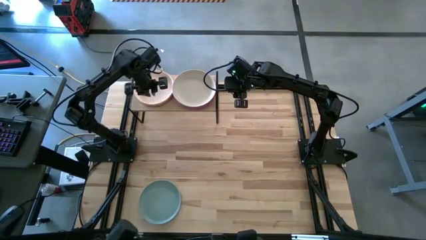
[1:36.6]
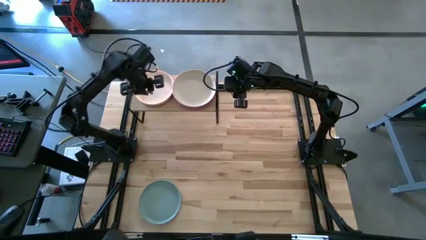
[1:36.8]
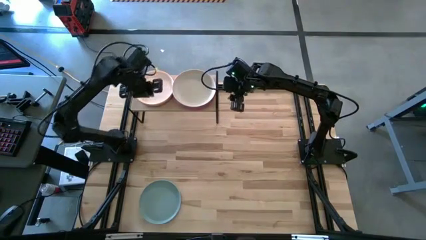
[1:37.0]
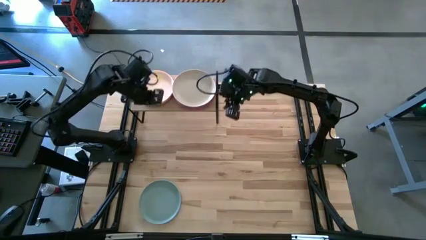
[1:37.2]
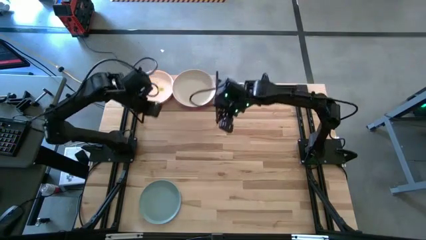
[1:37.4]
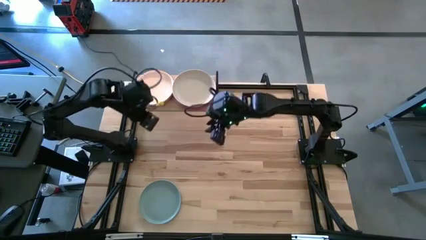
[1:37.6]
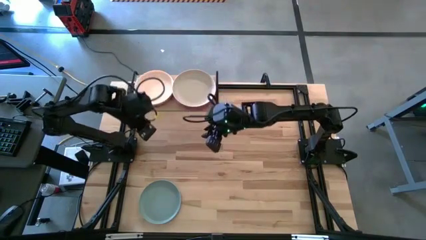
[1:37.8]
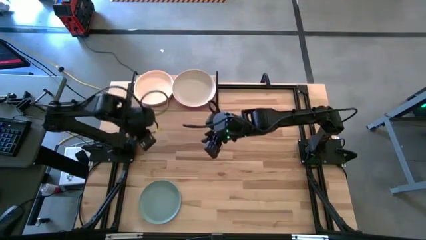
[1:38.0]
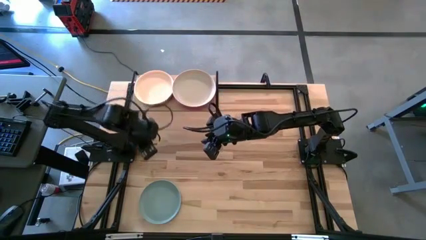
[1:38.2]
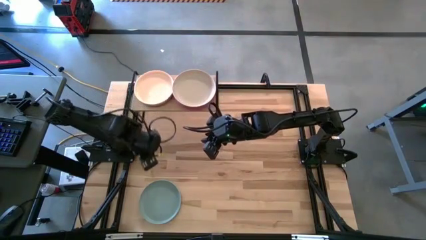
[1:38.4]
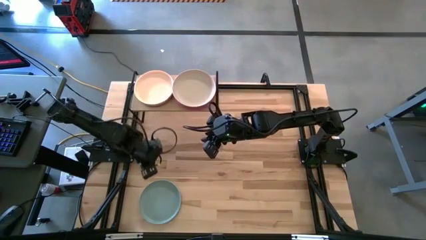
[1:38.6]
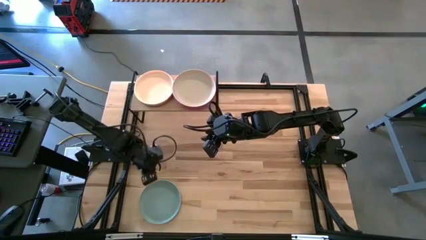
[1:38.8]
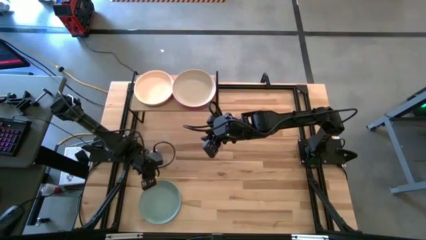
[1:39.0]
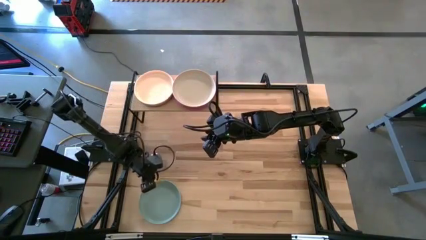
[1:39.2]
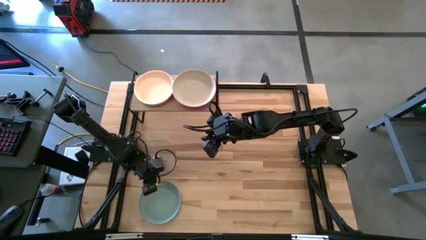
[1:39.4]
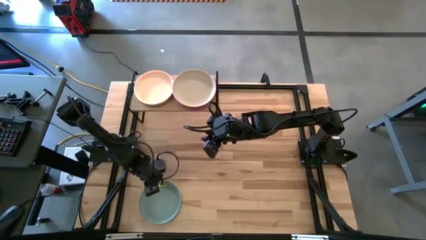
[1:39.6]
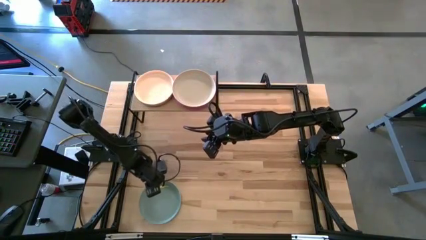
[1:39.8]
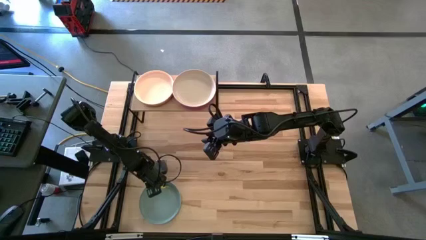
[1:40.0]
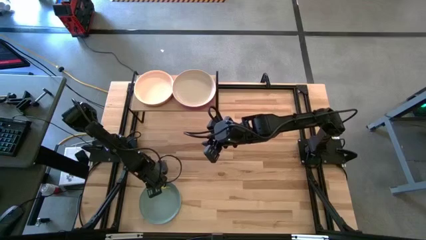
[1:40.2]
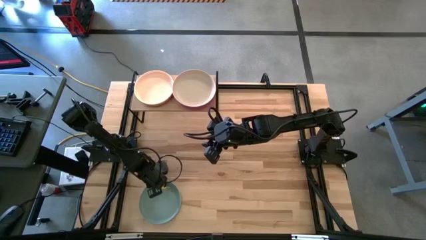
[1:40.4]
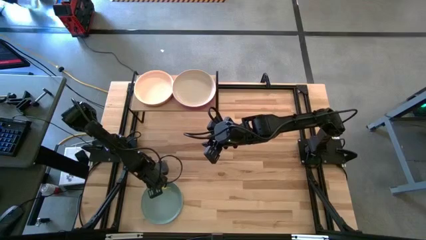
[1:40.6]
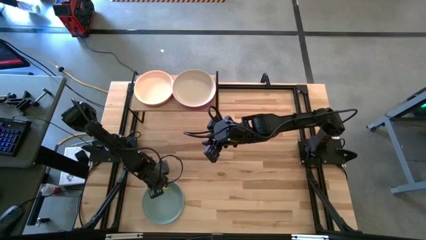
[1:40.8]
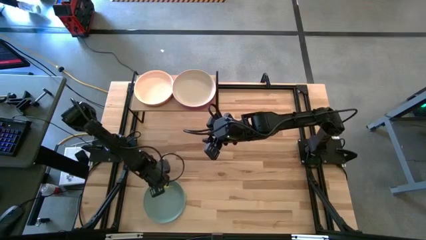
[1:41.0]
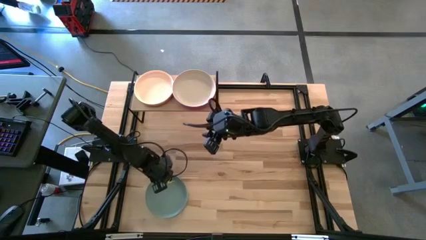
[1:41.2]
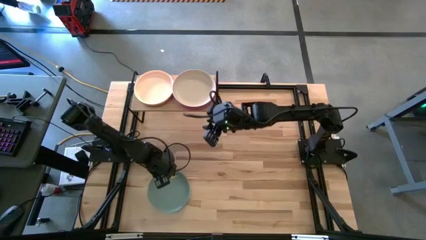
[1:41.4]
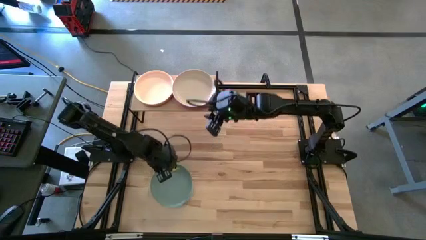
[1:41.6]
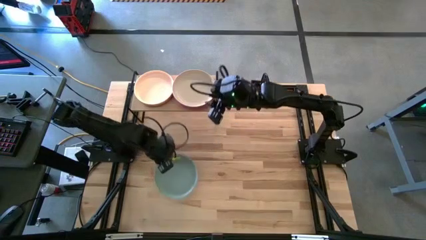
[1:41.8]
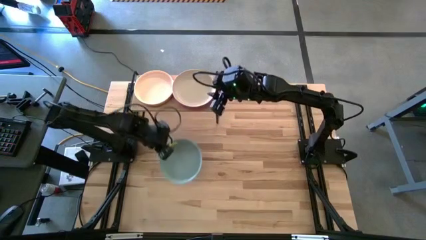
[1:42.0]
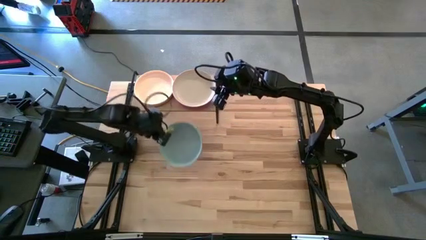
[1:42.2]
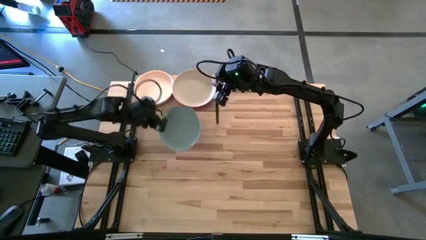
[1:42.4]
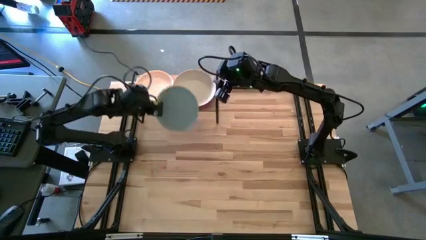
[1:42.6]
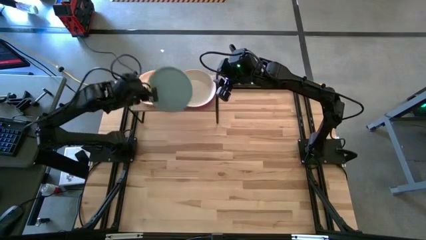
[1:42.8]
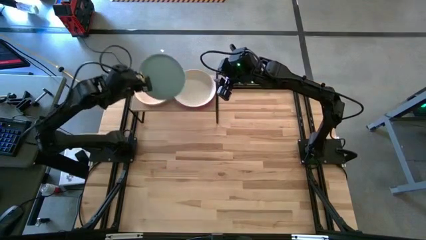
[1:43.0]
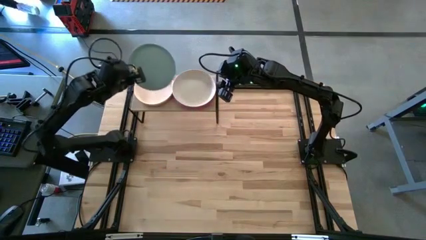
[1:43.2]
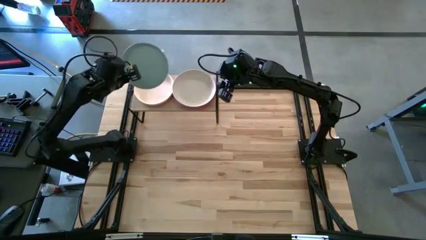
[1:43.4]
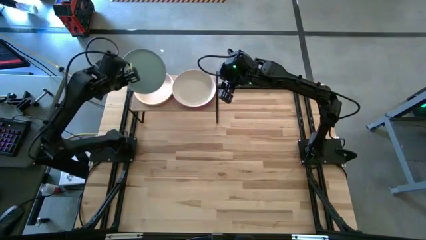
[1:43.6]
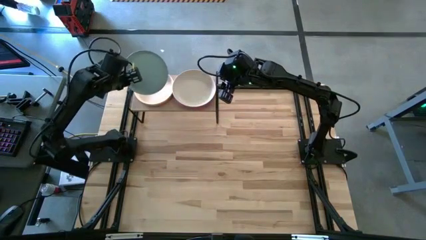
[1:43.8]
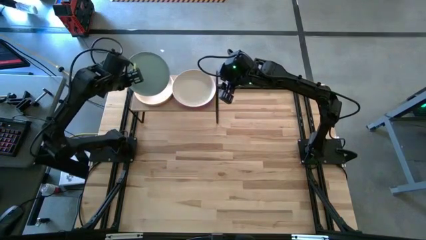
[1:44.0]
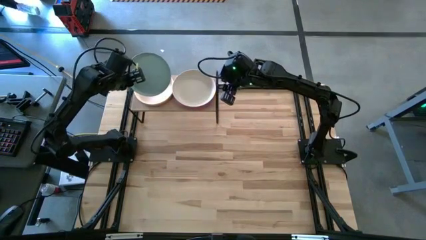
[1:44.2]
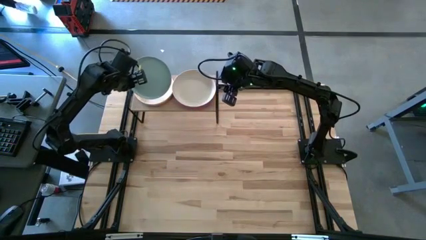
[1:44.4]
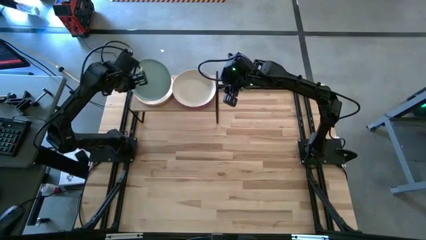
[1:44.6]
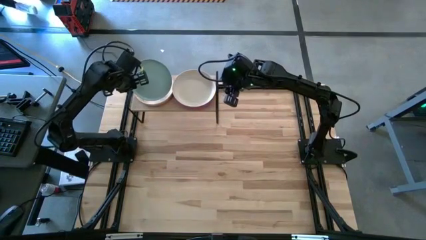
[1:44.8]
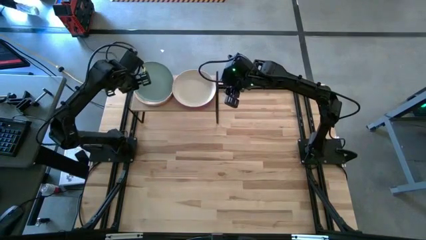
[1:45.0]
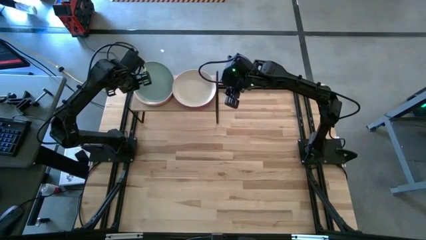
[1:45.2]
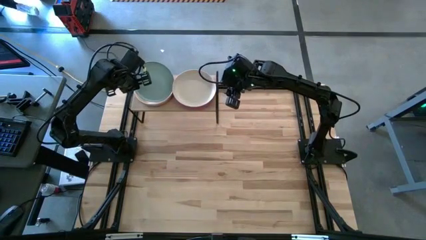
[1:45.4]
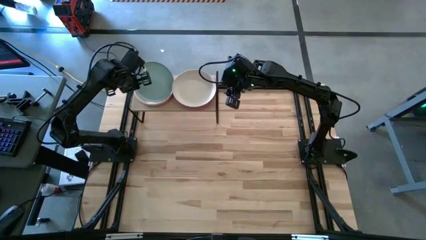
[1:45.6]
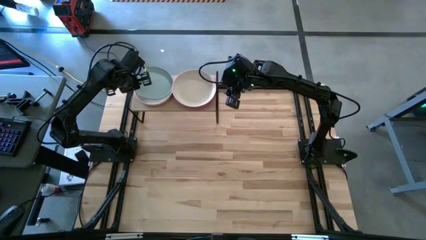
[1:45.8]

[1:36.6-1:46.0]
Task: Place and stack plates onto a shelf
Stack the blue plate on top of the white plate

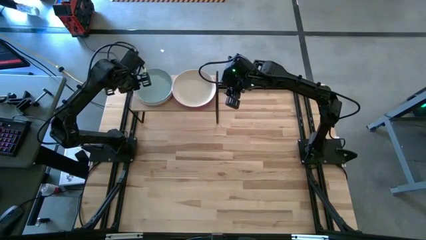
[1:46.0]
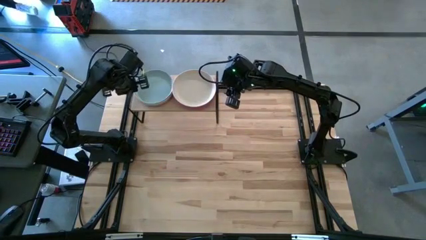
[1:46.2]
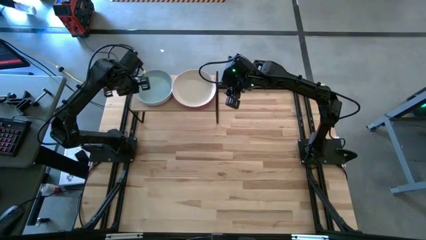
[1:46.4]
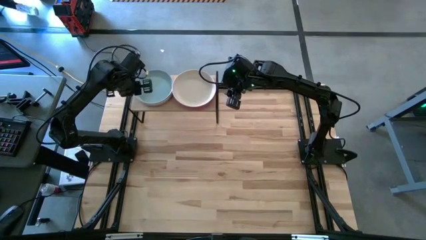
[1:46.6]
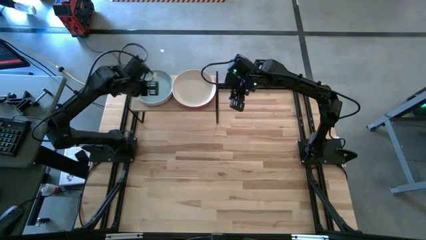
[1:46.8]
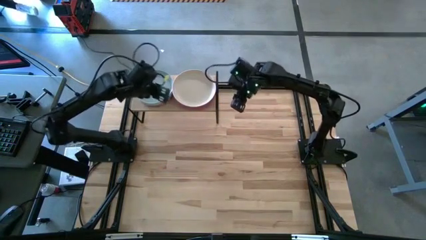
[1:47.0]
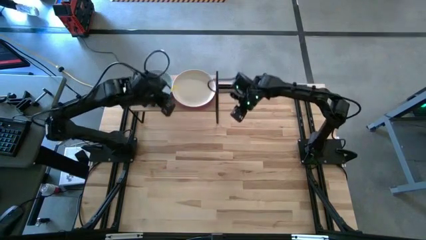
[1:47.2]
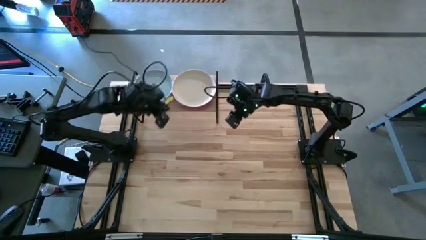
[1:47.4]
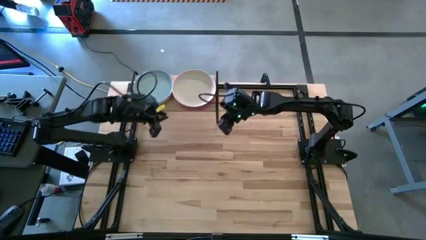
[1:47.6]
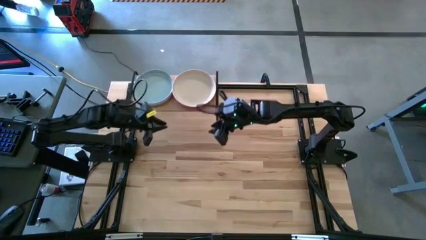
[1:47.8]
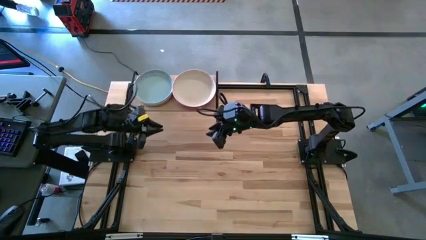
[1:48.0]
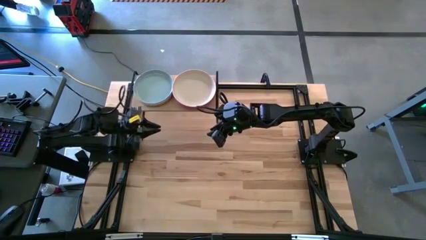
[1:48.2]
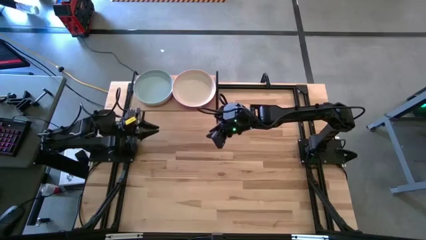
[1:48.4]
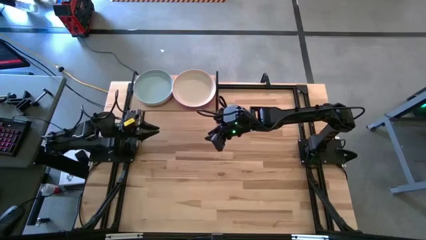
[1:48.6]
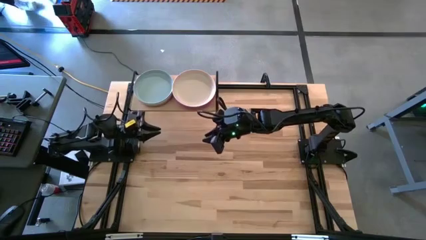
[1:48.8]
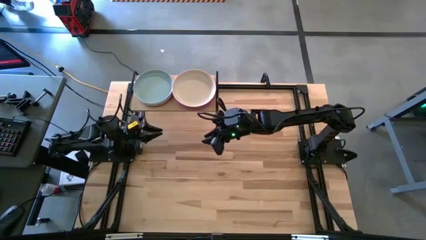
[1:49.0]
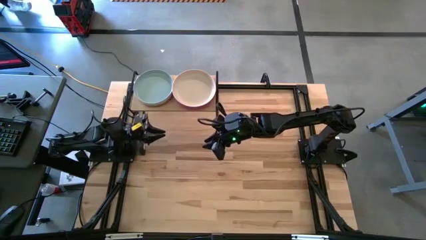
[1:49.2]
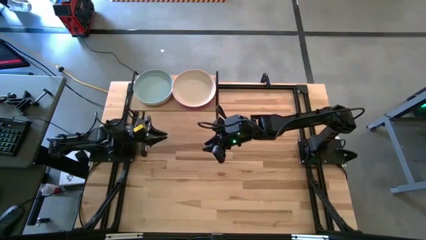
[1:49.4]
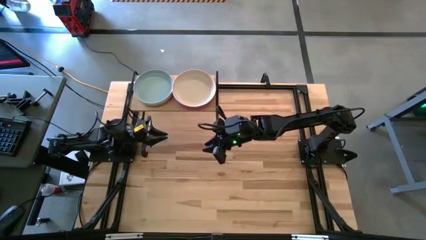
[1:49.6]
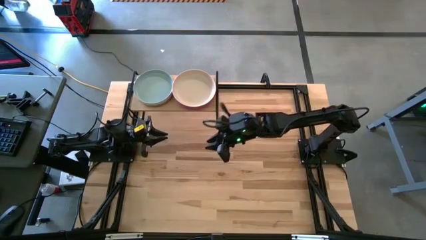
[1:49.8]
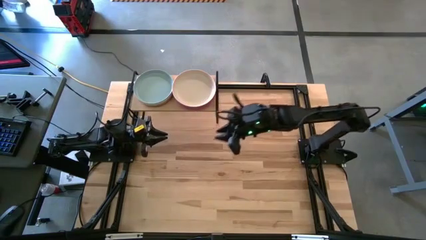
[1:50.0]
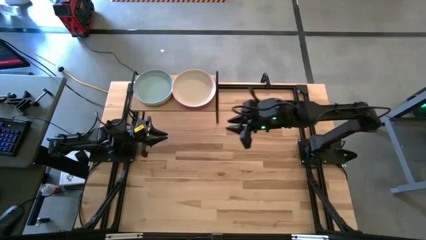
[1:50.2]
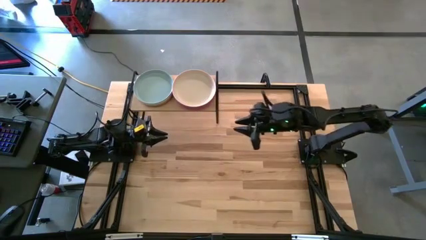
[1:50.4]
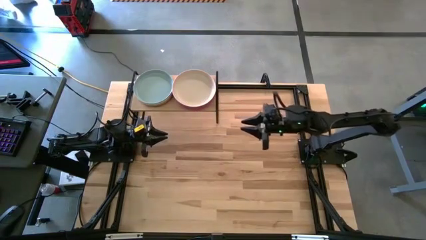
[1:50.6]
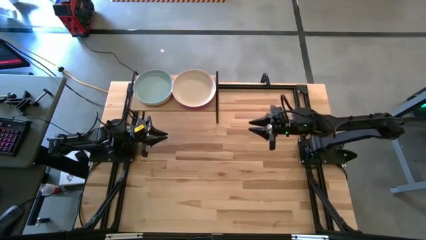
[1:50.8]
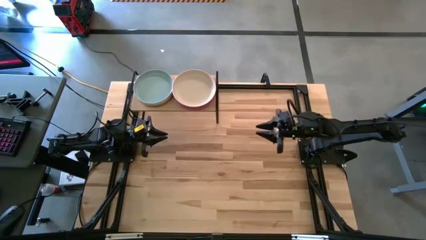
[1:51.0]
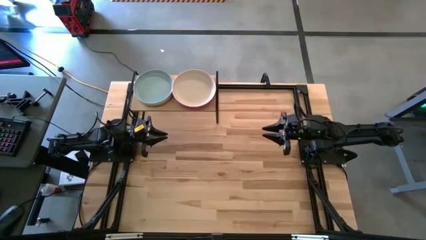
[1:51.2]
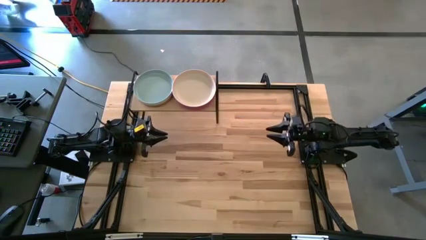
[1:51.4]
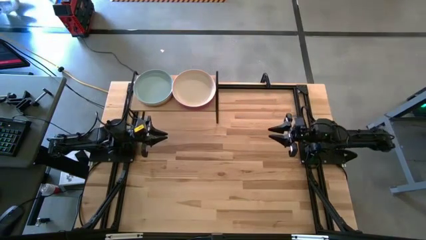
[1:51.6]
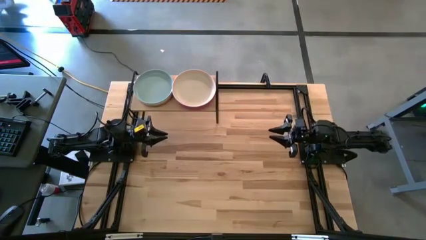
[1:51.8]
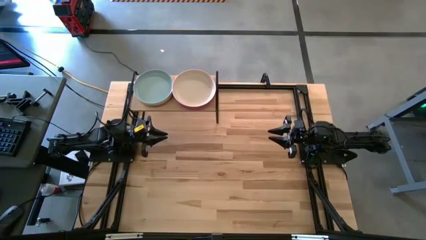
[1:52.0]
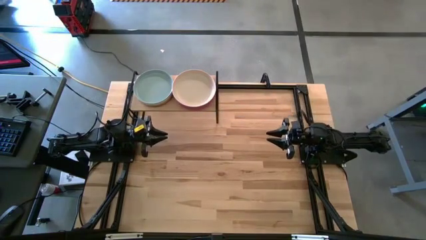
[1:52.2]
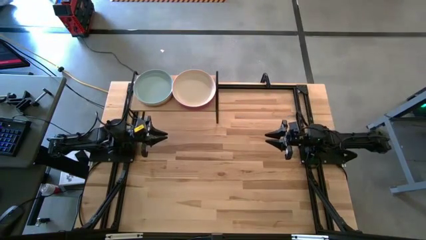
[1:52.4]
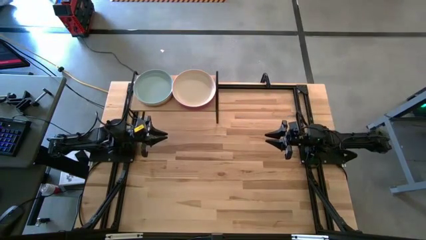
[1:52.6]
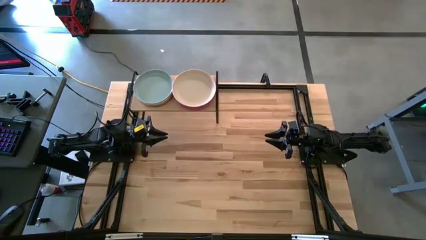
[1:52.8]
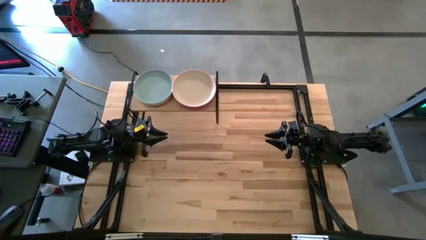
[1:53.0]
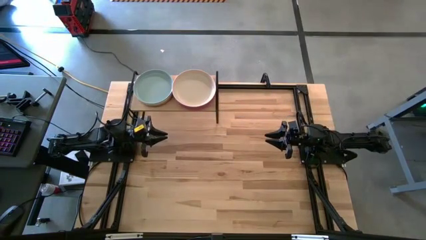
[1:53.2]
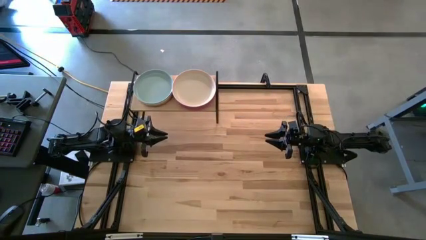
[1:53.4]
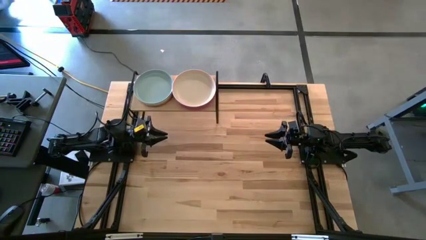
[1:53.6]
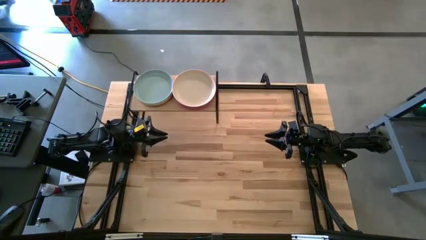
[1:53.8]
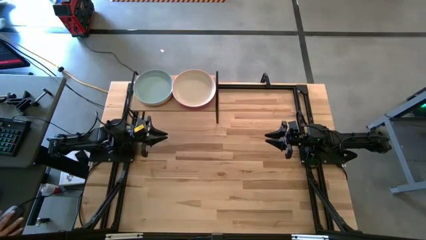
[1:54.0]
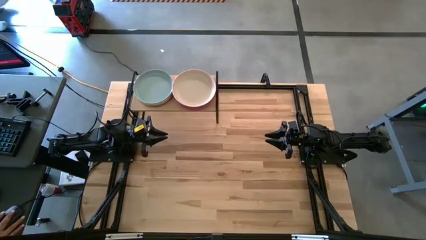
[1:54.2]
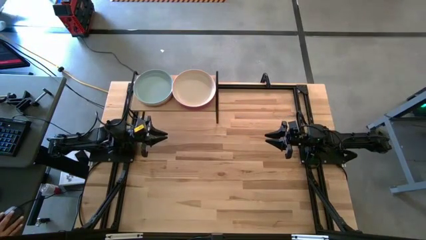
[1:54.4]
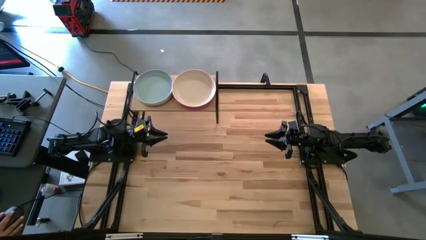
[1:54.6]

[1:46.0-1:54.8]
Return to Home Position
